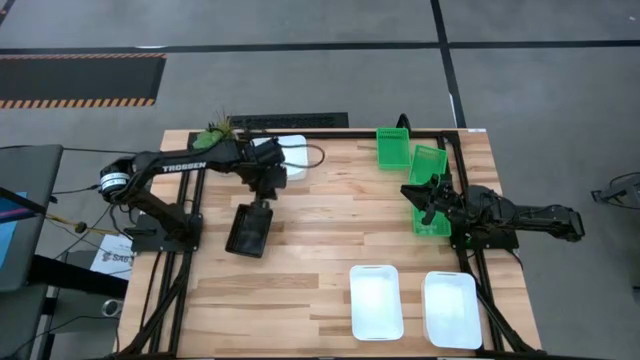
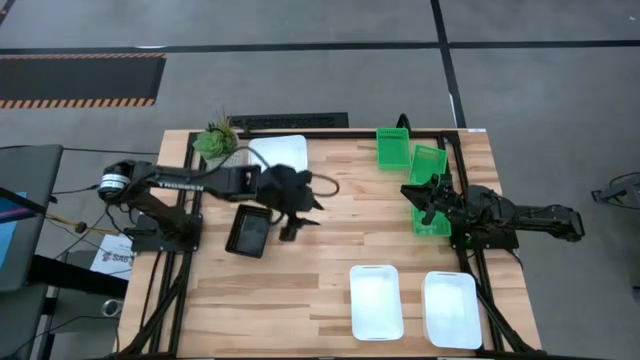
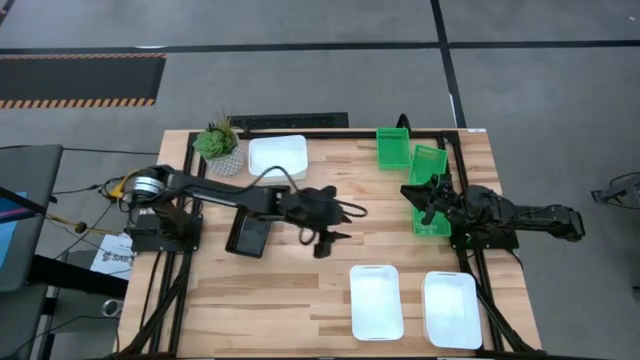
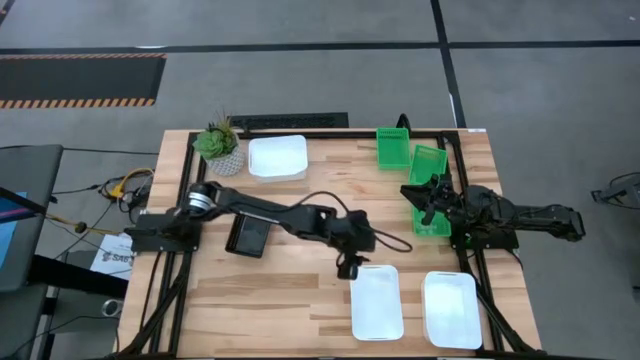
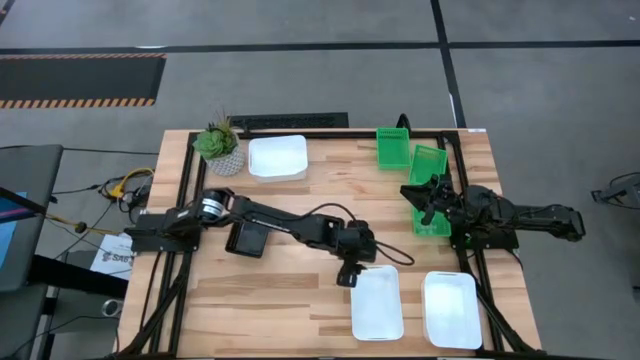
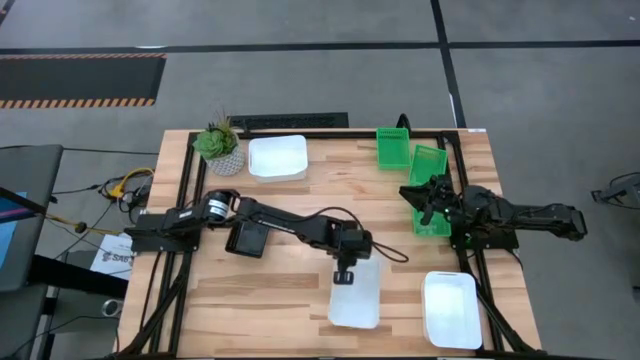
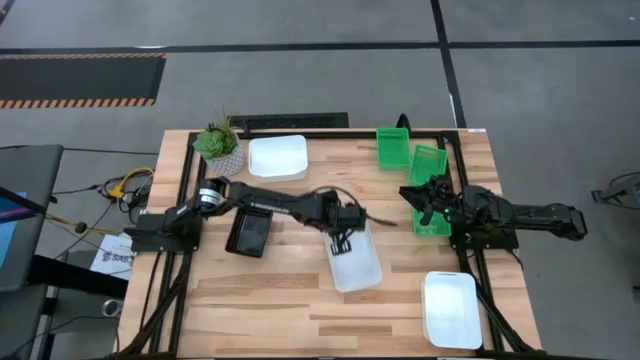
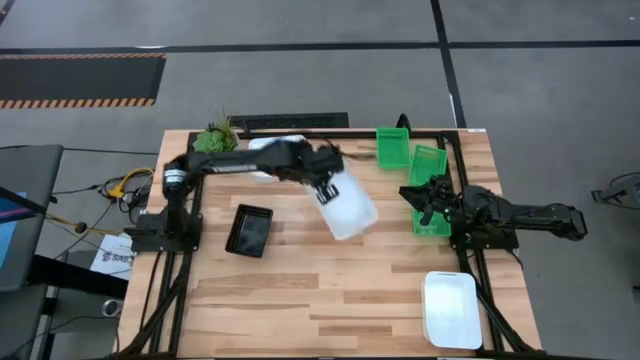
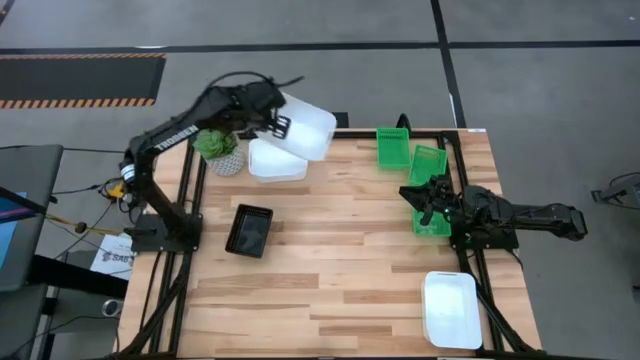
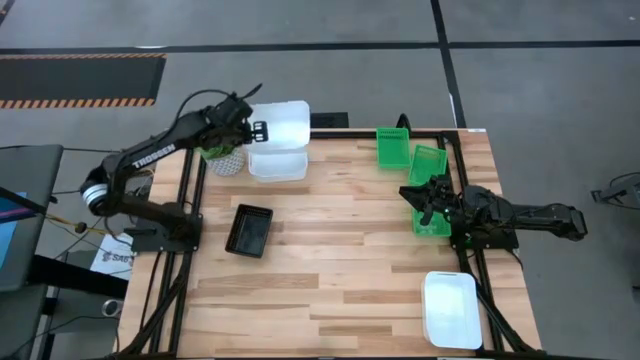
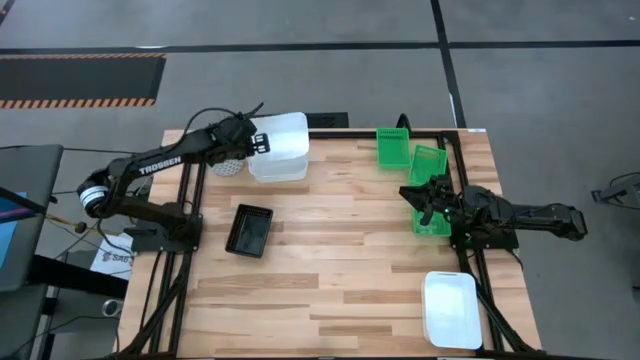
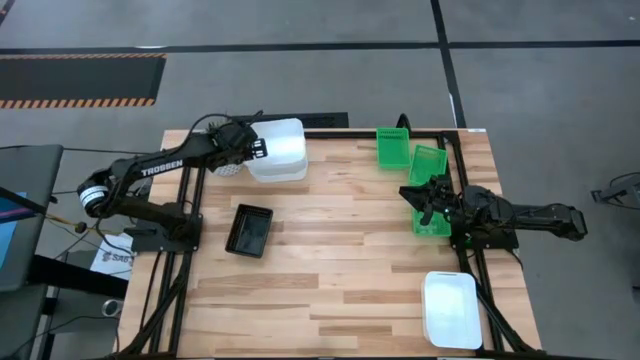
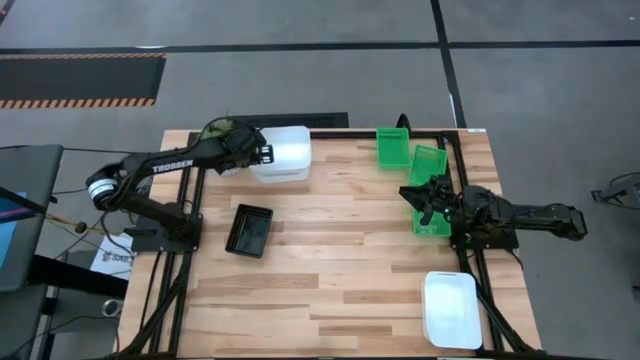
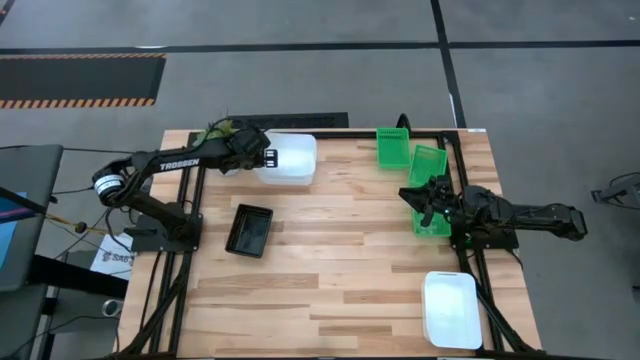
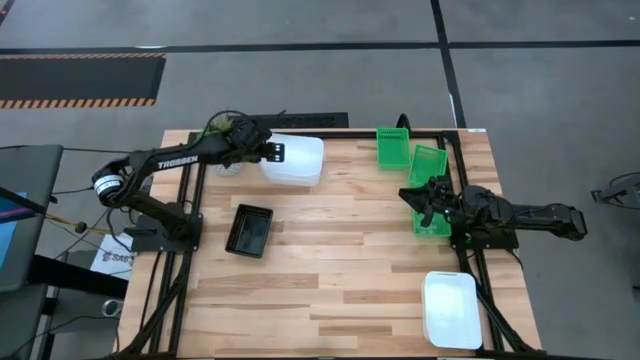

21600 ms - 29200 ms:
Stack the left white bin on top of the top white bin

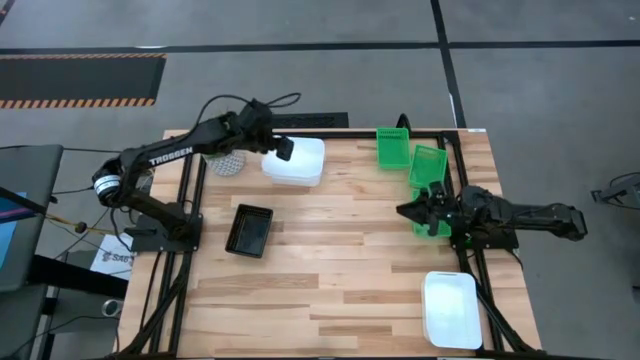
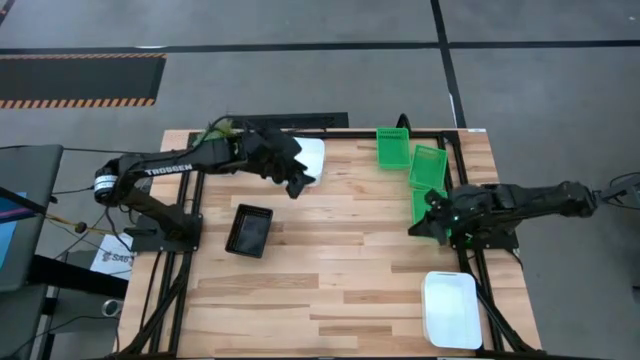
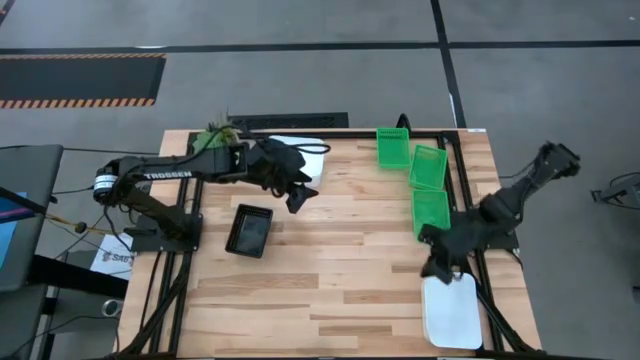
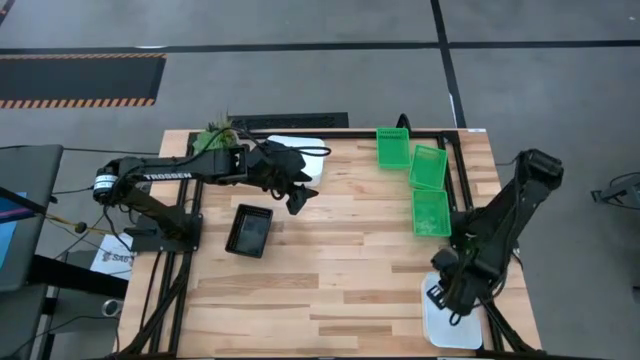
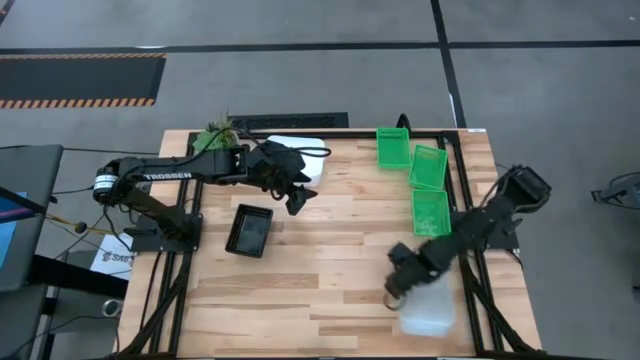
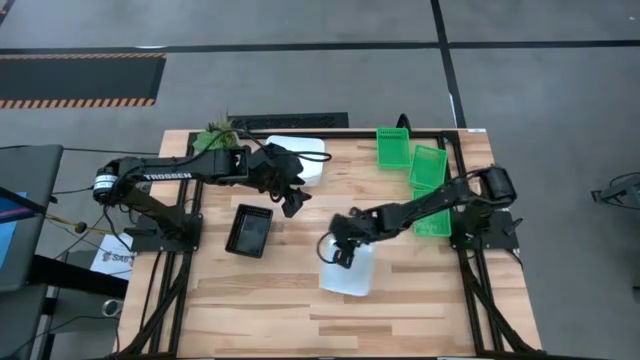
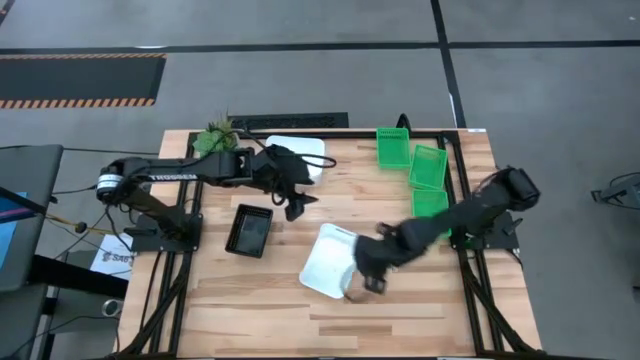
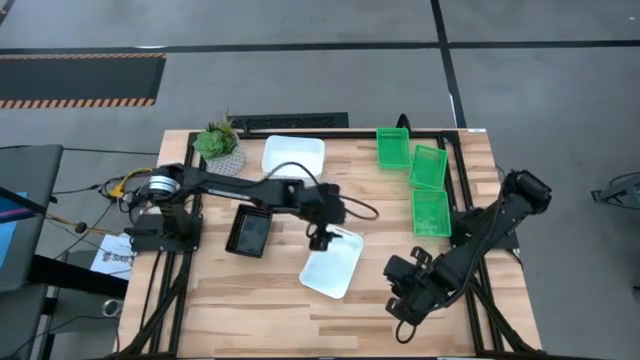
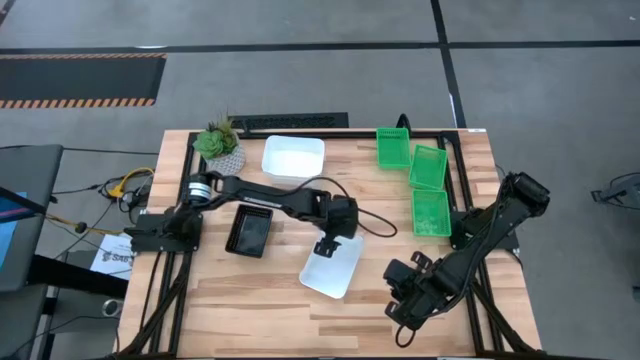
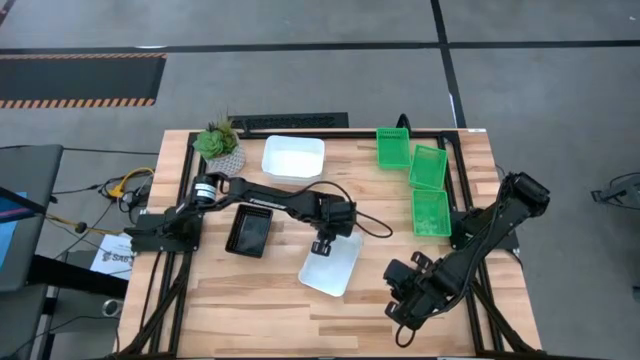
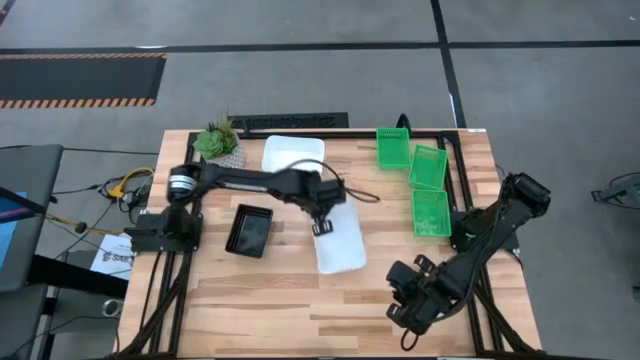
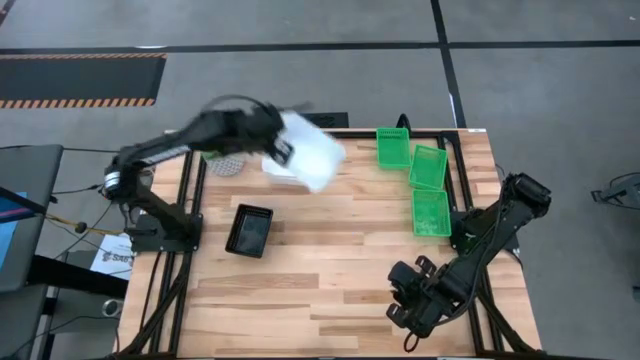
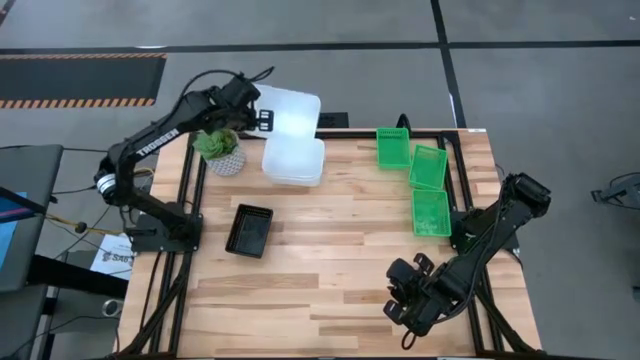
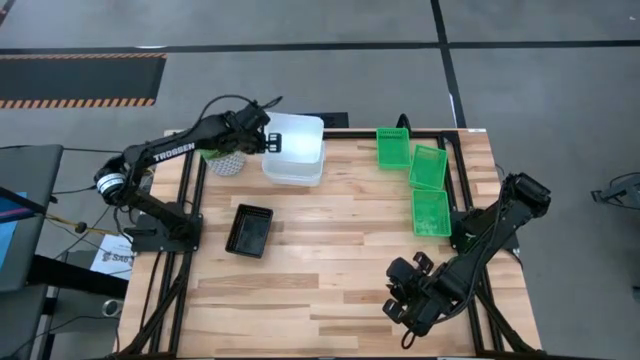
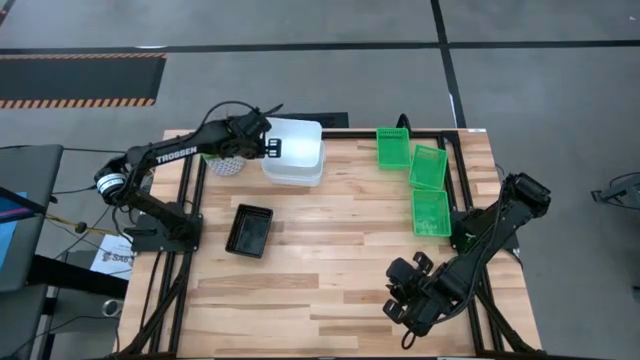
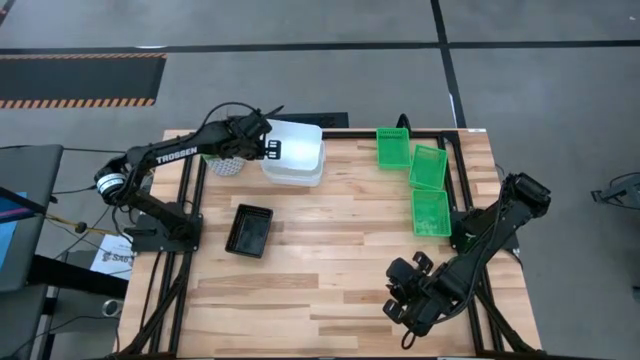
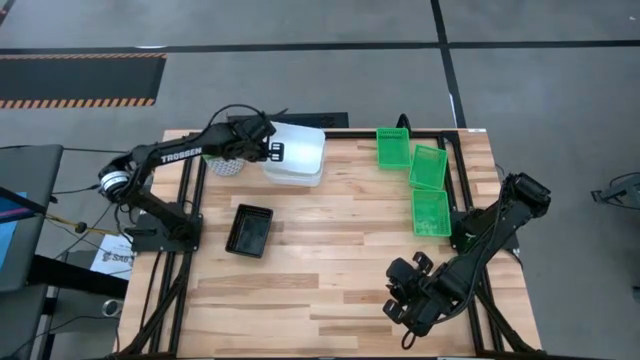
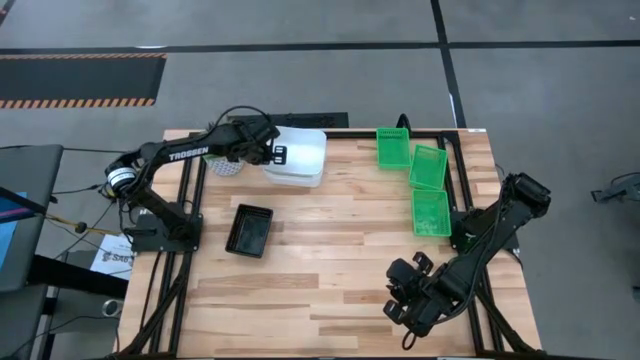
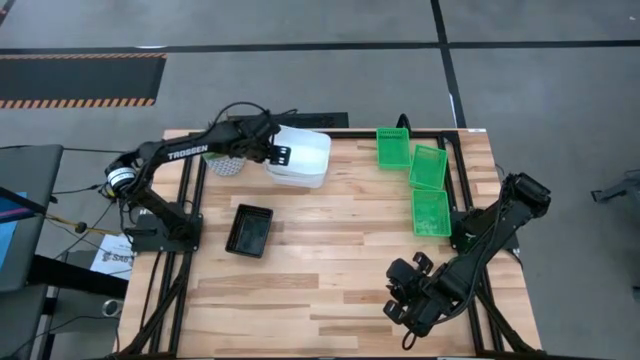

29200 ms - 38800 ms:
Stack the bottom white bin on top of the white bins

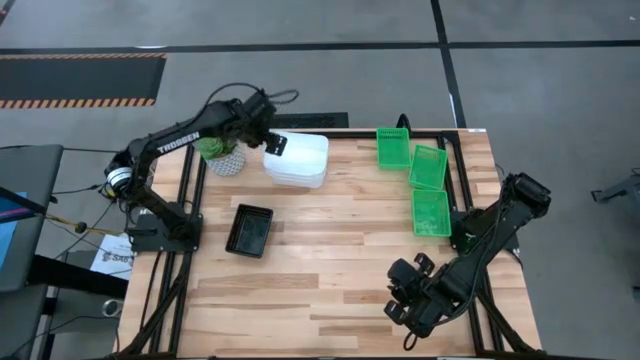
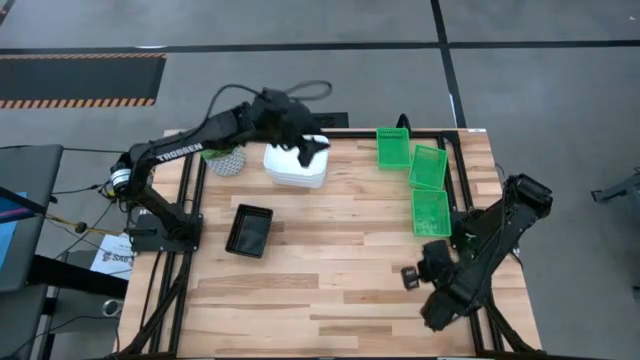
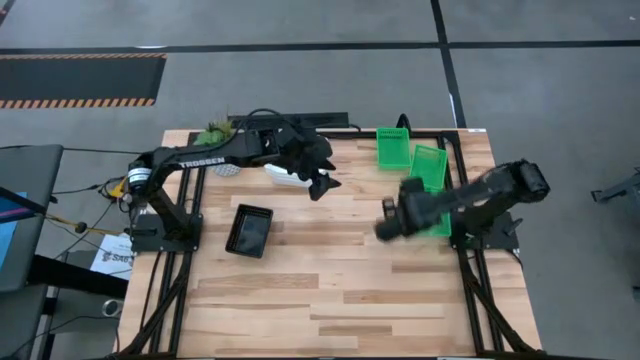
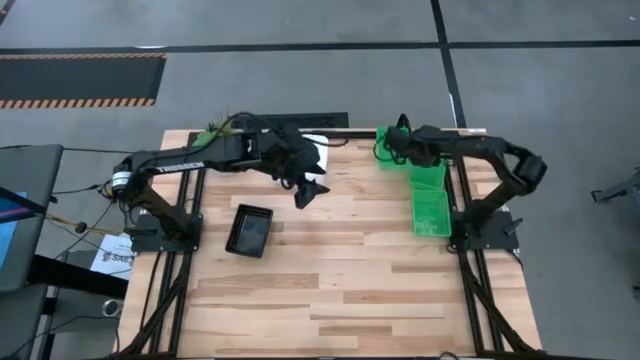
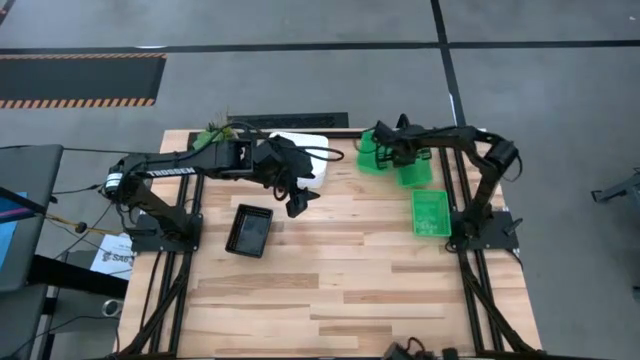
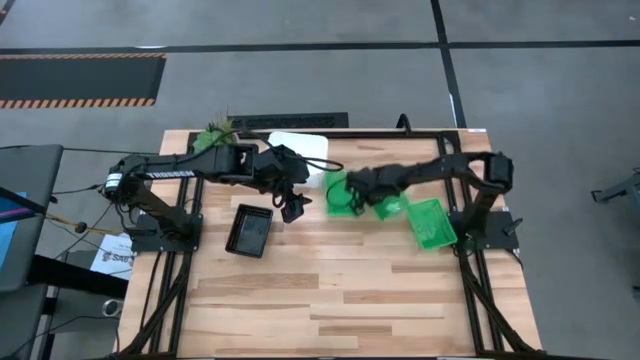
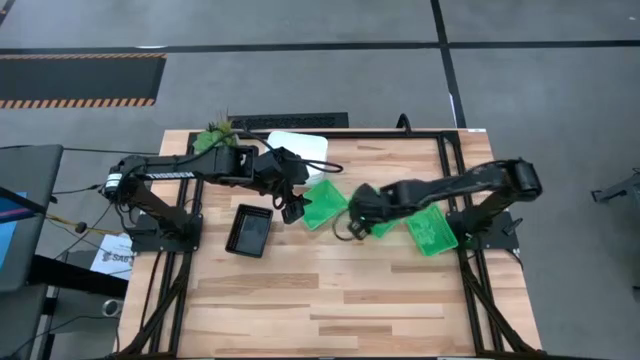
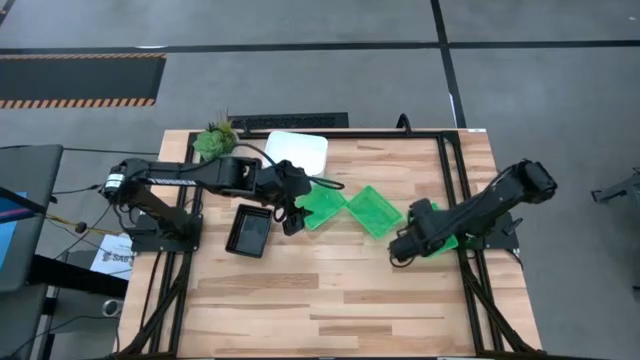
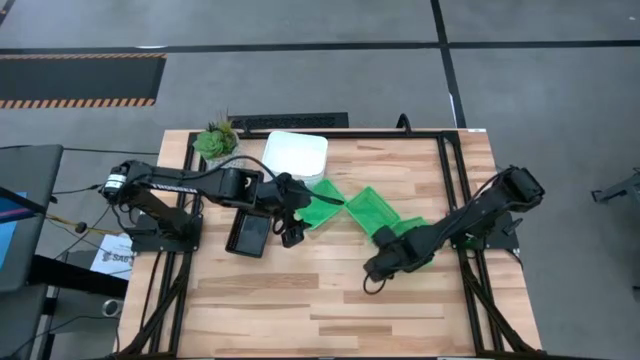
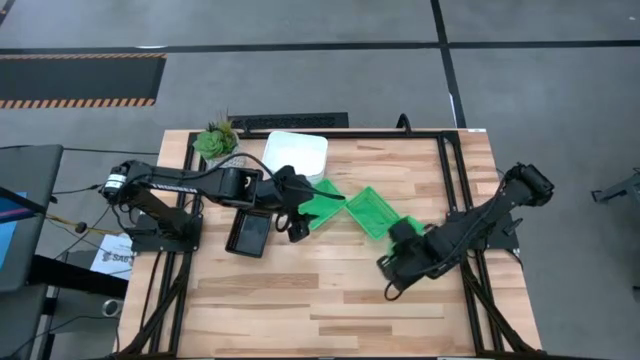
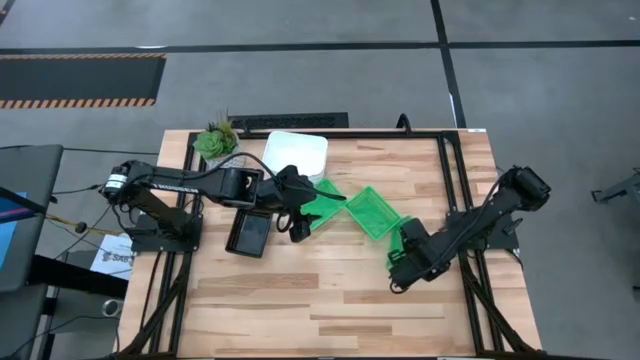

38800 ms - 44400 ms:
Move the green bins to the center of the table
